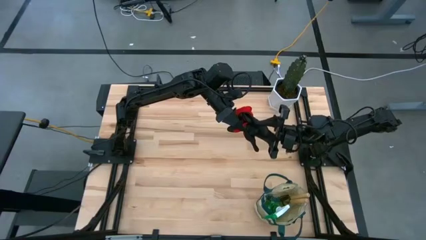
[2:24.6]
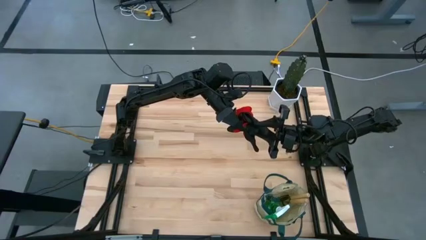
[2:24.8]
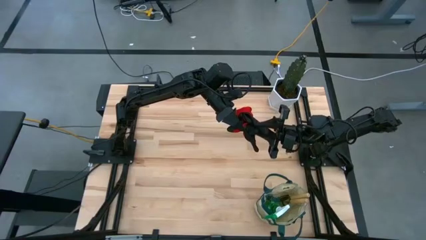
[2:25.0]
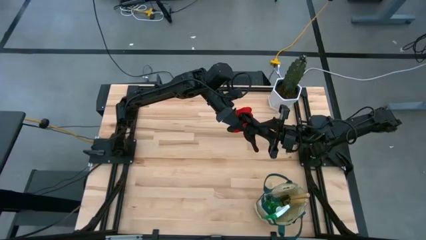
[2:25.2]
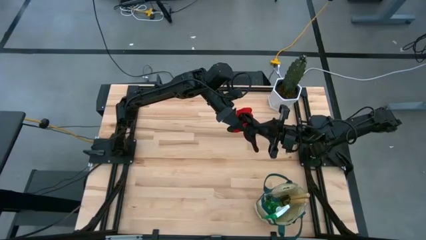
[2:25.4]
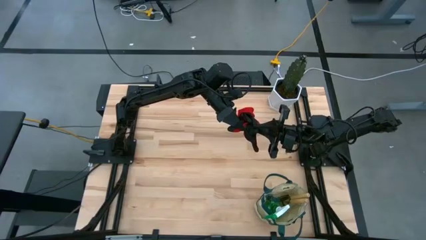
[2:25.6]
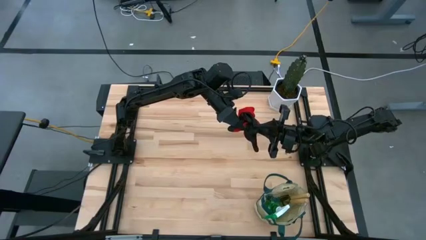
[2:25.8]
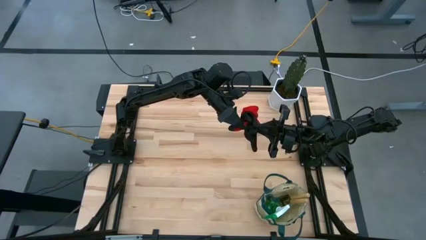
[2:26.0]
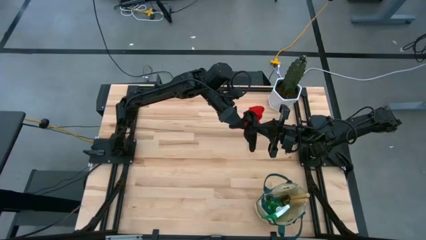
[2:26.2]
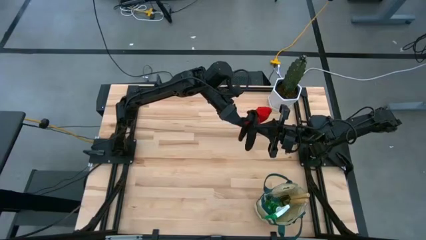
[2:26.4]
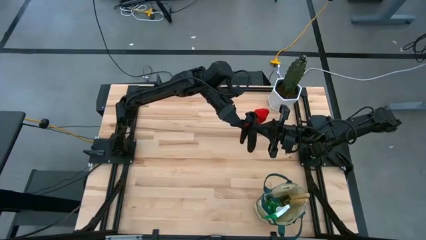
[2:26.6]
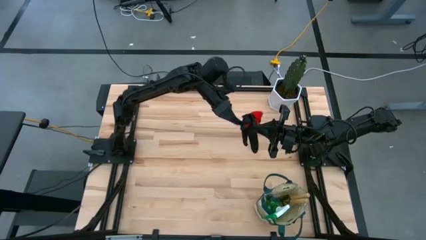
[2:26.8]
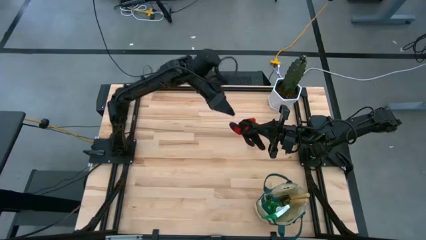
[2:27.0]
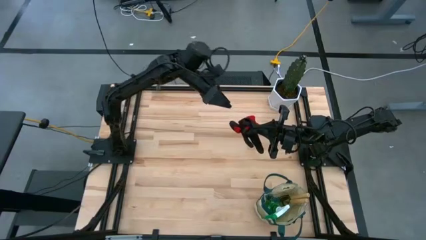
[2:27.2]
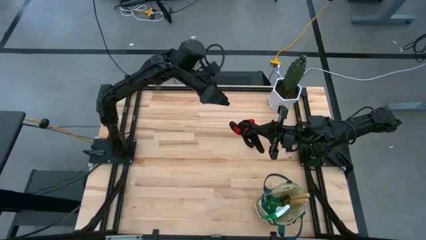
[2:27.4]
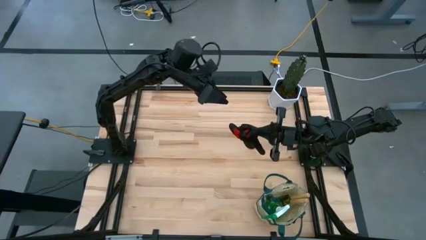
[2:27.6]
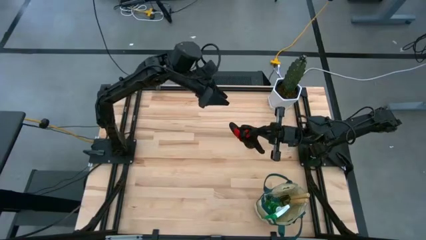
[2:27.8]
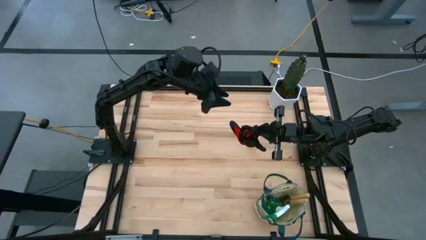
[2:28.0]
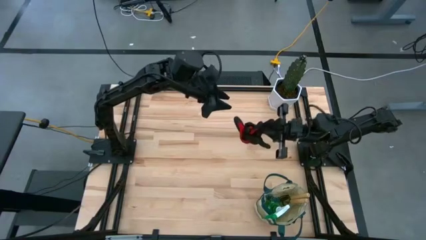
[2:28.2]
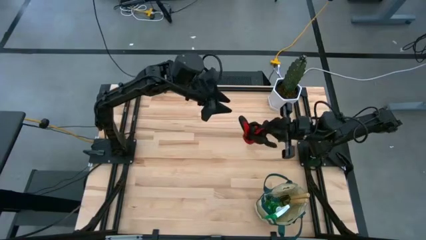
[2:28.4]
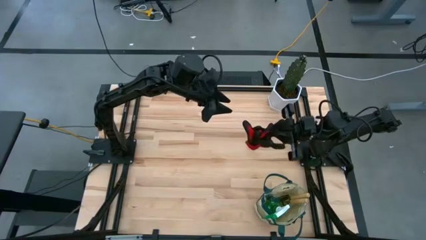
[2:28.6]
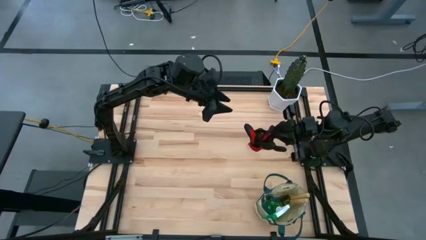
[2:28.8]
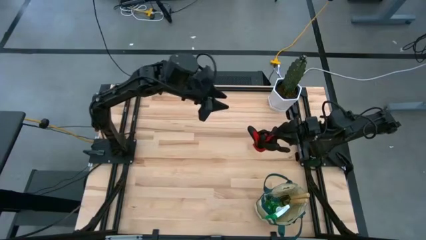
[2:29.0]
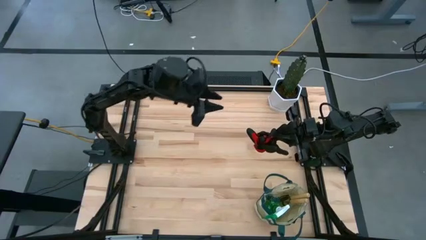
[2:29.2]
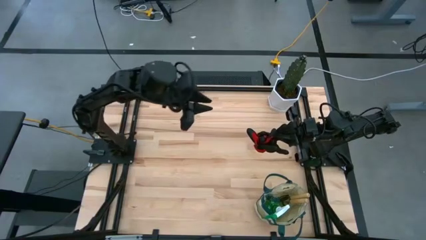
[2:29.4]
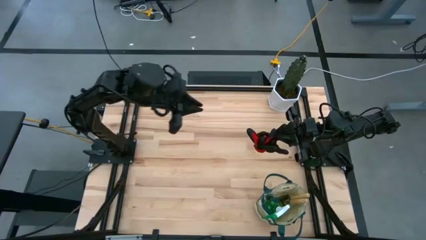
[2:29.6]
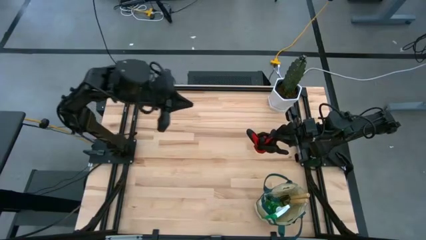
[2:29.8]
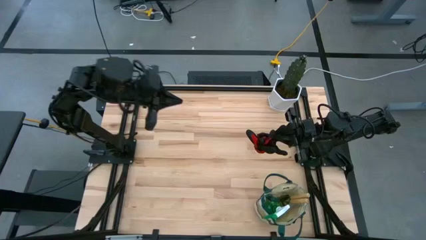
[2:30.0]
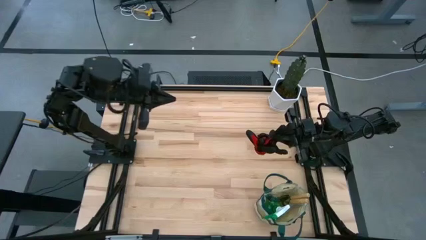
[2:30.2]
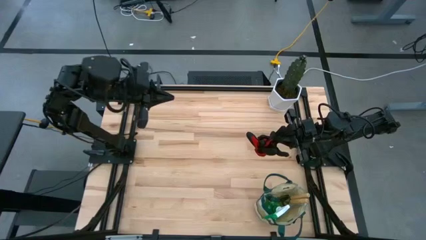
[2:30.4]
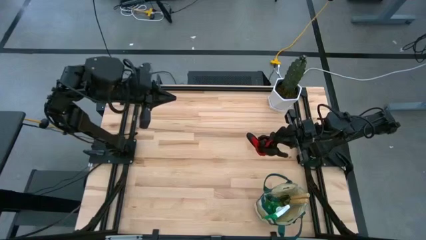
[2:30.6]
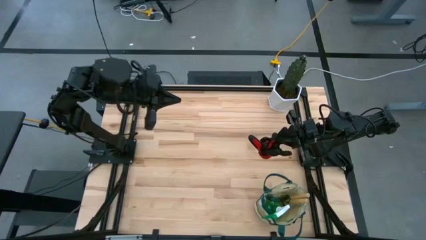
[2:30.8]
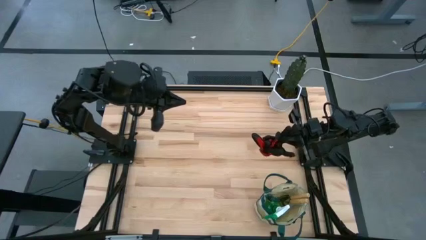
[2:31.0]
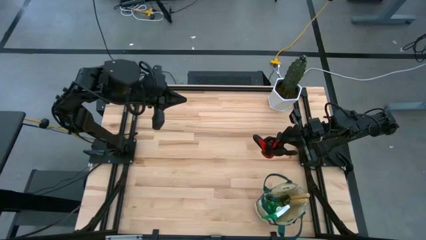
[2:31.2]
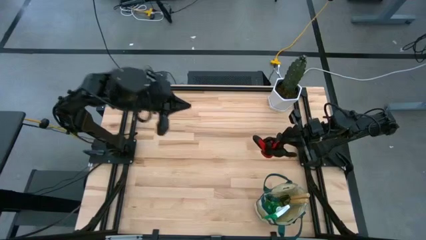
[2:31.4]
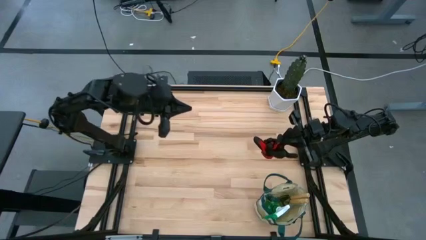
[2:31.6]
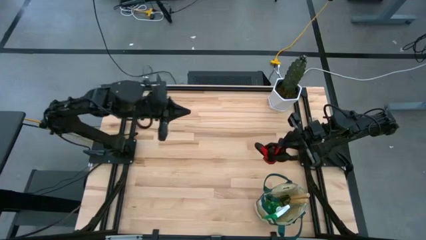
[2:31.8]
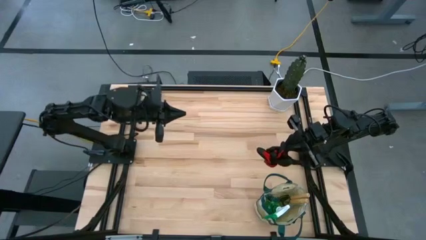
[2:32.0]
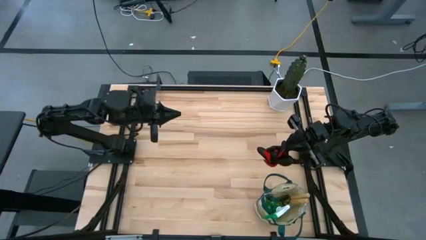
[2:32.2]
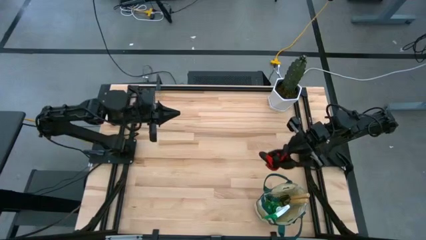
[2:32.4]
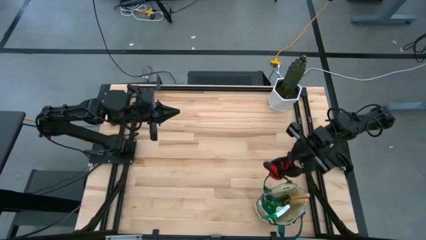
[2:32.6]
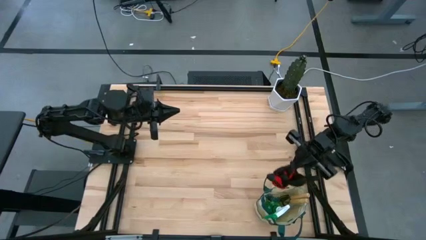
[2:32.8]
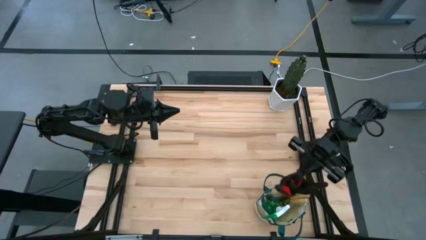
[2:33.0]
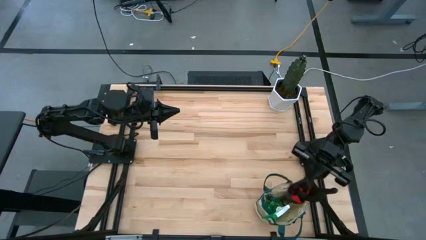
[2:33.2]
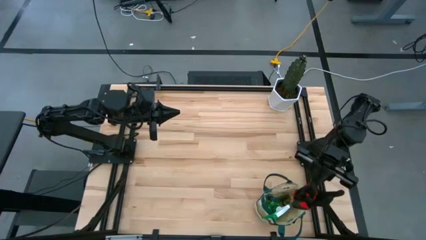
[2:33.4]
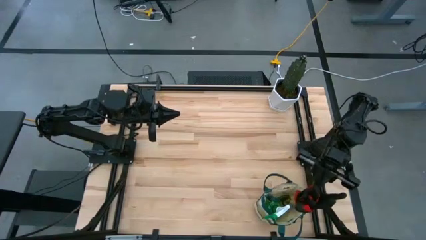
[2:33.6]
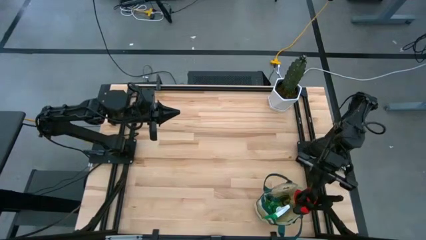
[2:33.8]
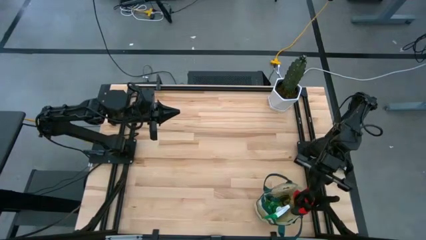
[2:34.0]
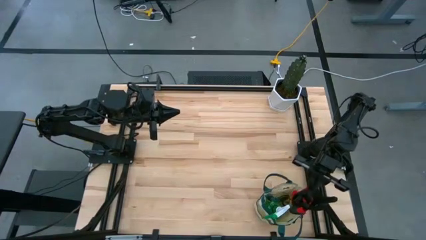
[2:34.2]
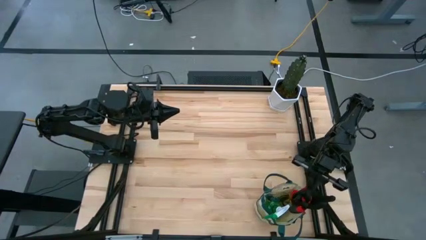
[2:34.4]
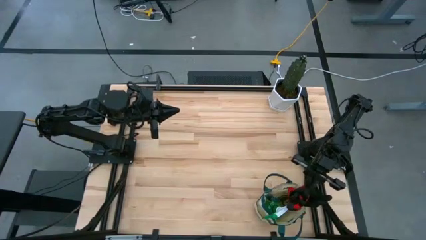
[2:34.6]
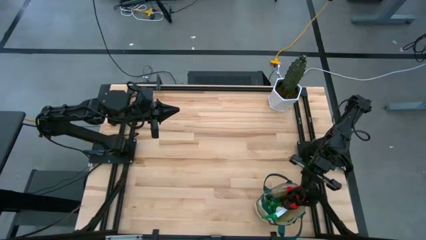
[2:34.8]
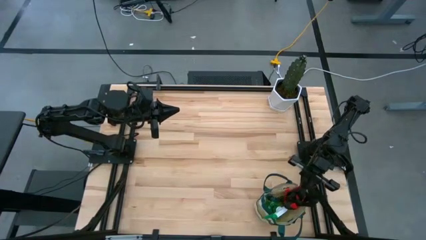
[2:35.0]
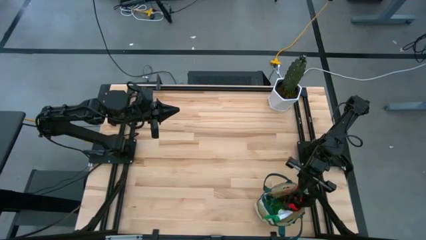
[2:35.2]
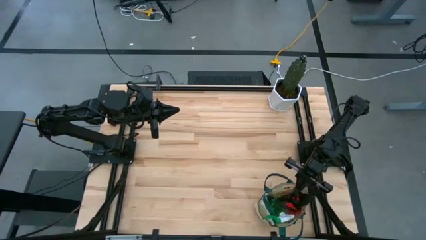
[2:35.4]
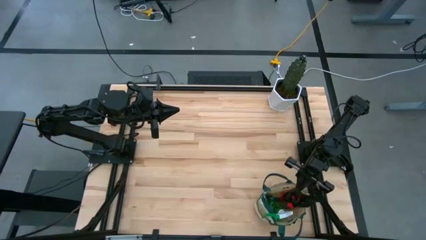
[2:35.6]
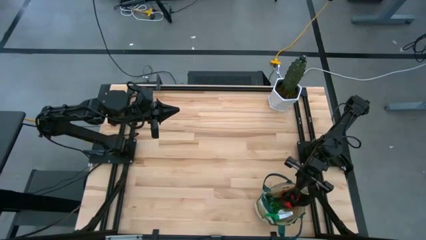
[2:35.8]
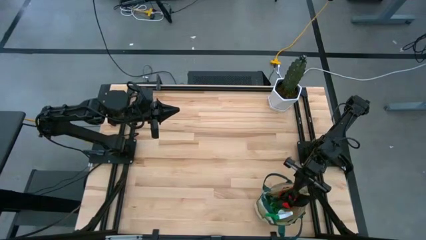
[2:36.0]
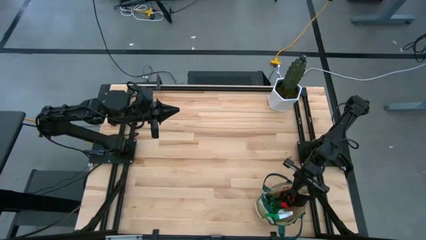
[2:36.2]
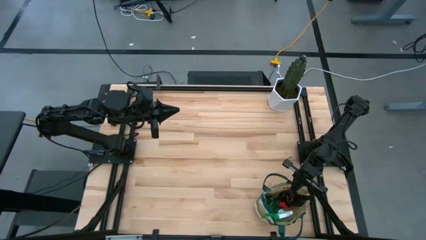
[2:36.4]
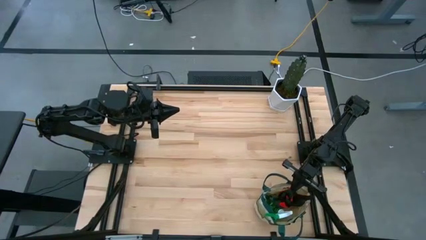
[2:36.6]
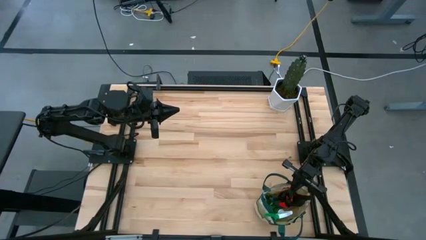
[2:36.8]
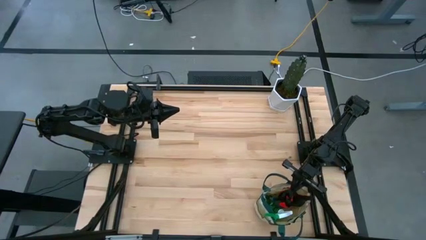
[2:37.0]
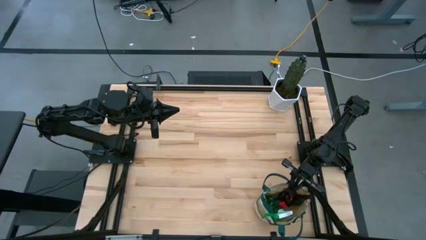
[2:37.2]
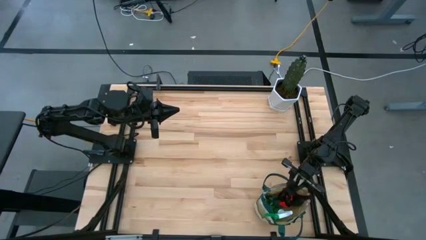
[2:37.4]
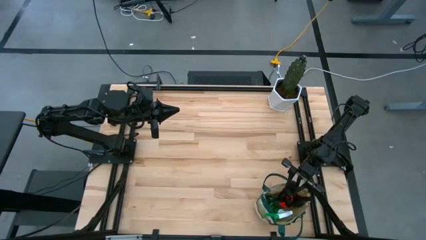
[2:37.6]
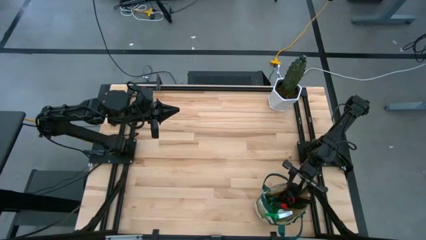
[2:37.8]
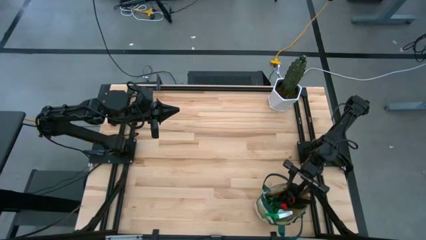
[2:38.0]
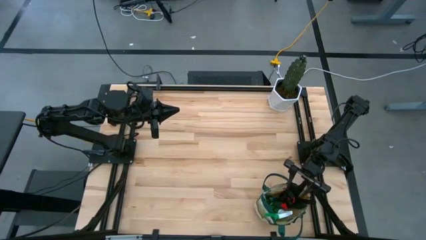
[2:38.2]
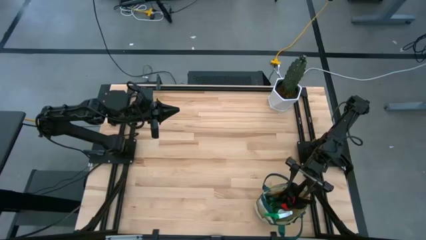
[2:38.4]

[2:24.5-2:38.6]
Task: Pick & Place Garden tools in Gardening bag
Put the red gloves into the gardening tool bag

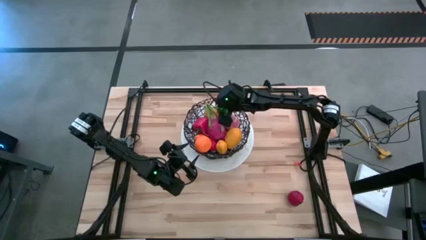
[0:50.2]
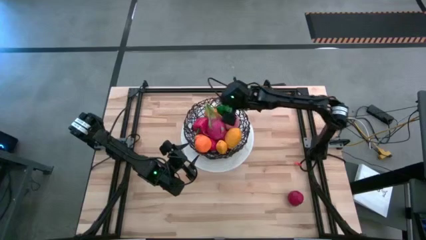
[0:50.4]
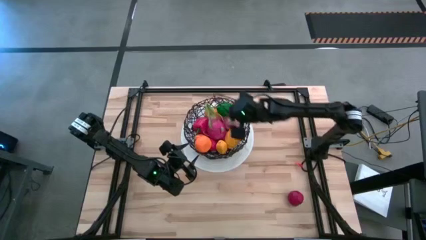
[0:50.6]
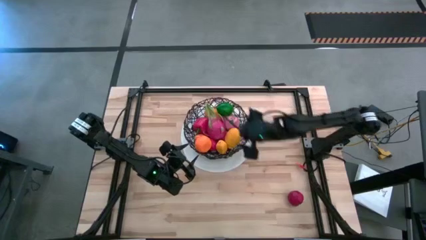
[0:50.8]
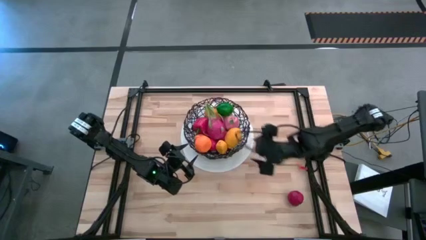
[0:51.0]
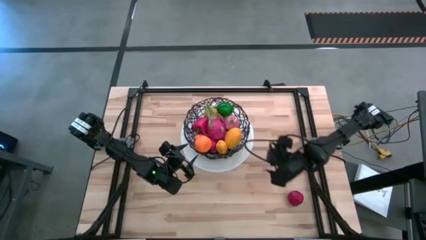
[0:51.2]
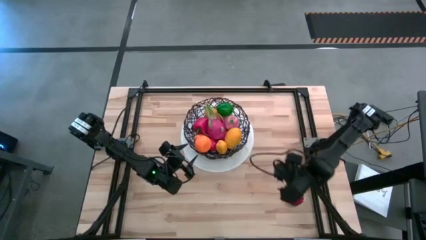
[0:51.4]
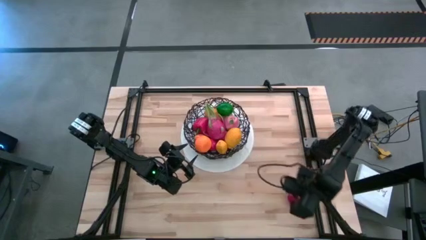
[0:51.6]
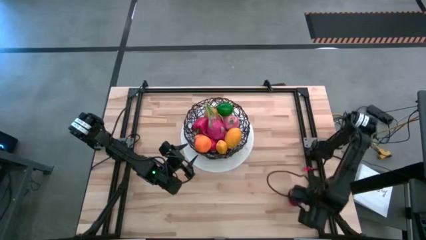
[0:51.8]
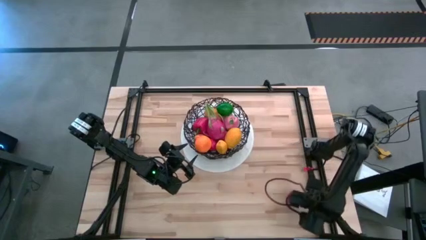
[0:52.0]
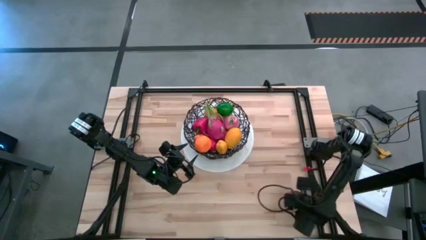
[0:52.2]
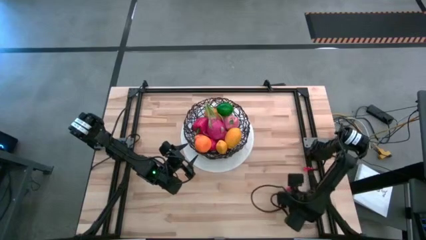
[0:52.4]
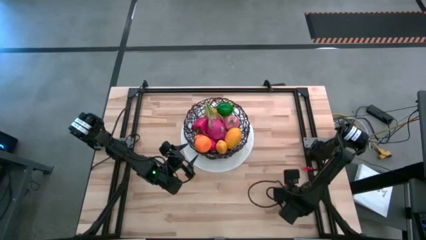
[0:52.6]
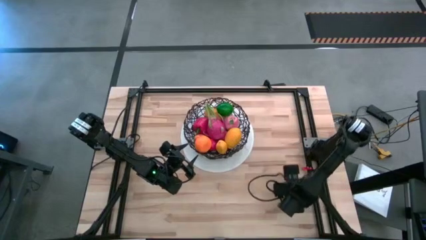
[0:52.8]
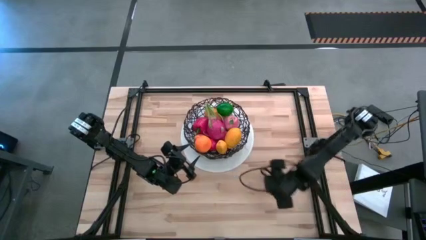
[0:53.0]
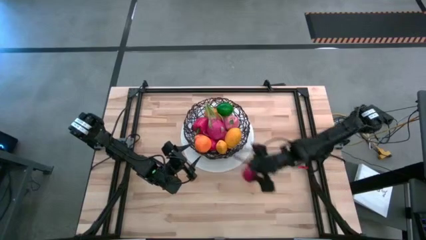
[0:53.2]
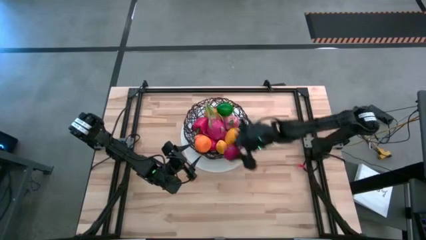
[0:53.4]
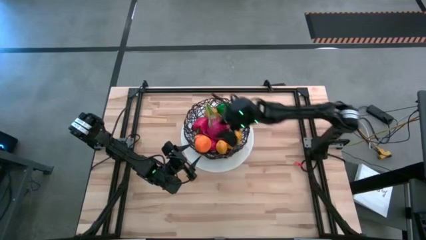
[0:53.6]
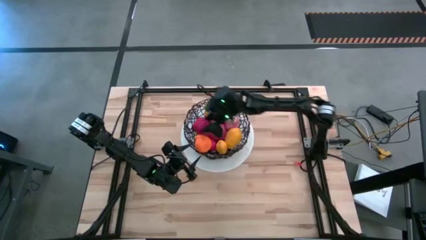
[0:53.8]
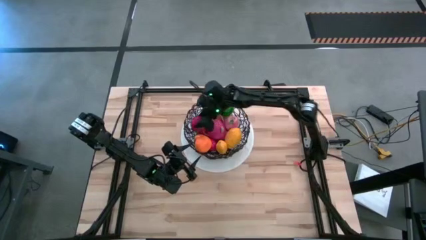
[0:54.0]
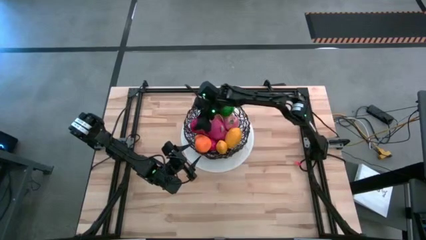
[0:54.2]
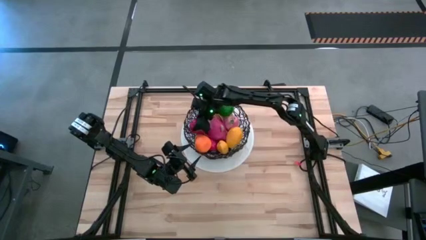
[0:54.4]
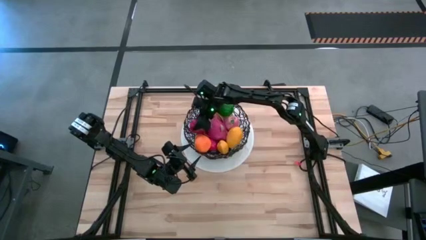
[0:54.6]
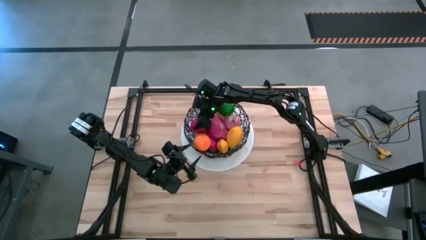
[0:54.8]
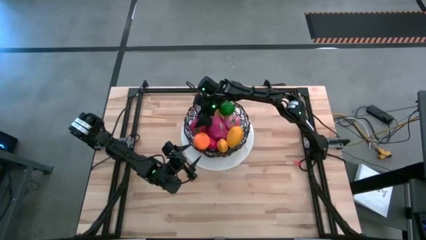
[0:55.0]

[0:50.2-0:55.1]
Task: Build produce basket
Put the tomato into the wire basket
